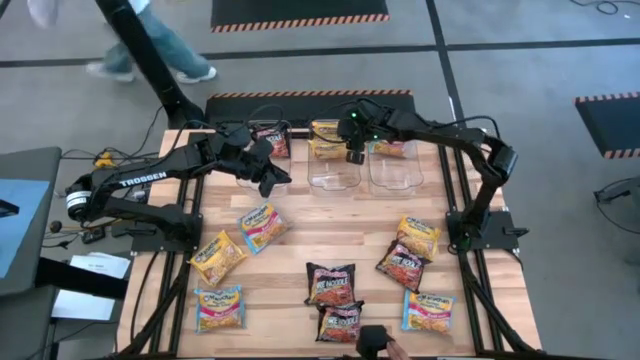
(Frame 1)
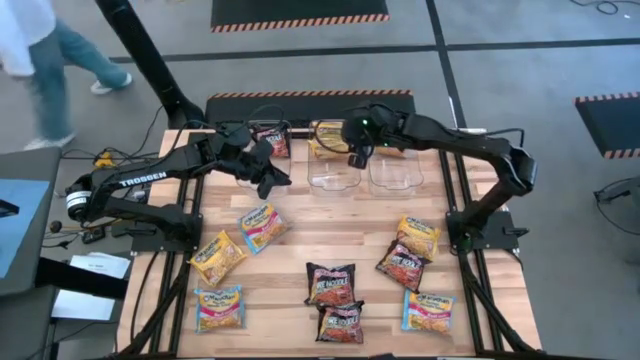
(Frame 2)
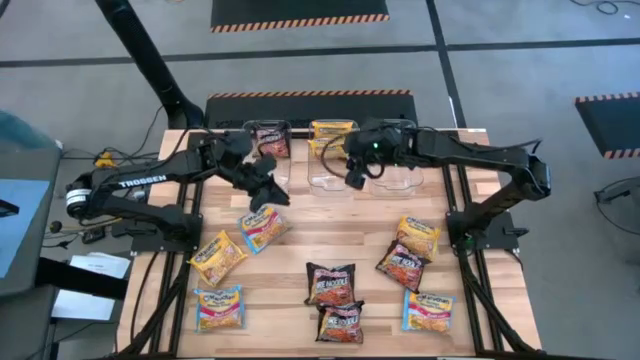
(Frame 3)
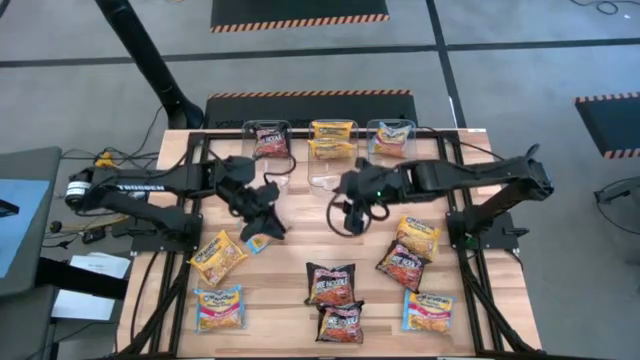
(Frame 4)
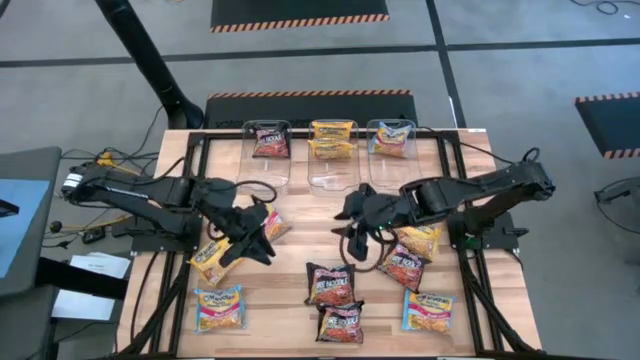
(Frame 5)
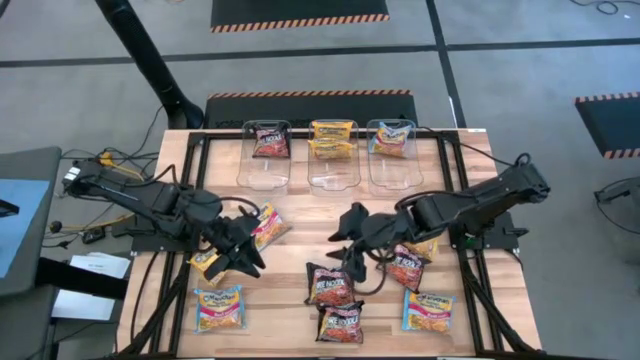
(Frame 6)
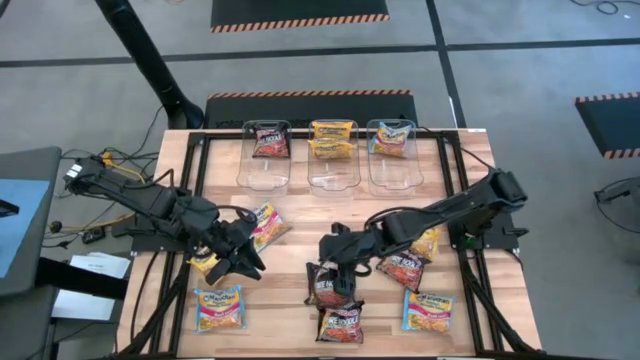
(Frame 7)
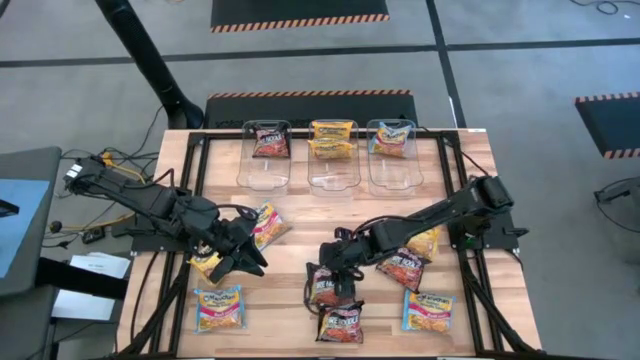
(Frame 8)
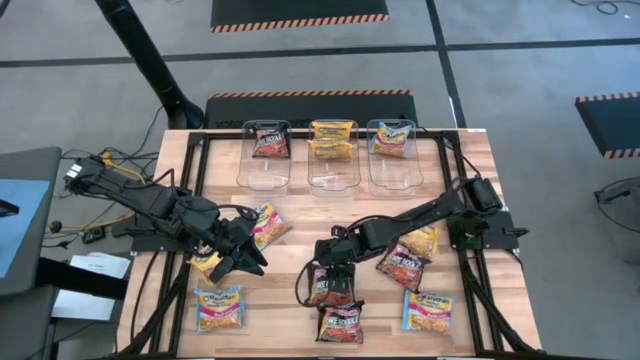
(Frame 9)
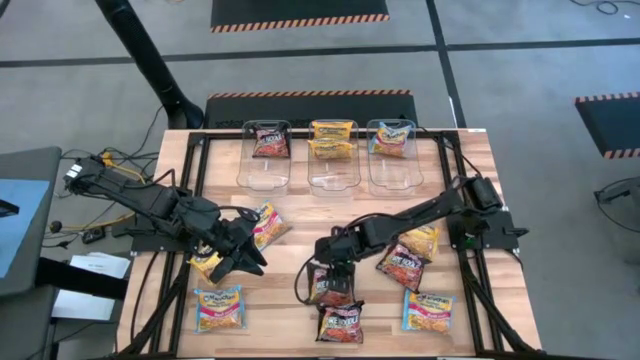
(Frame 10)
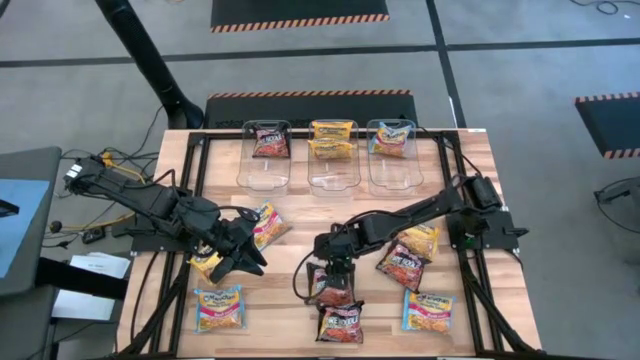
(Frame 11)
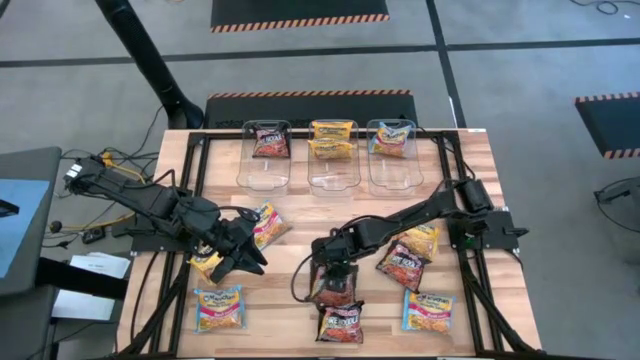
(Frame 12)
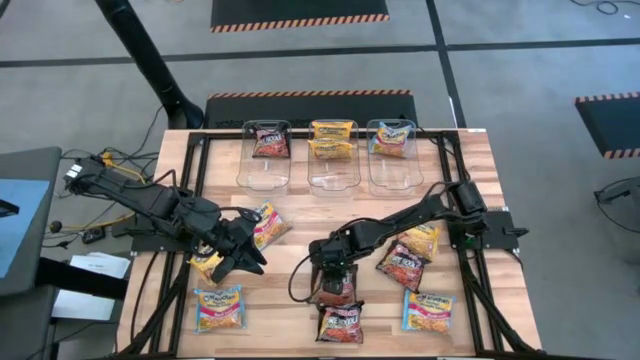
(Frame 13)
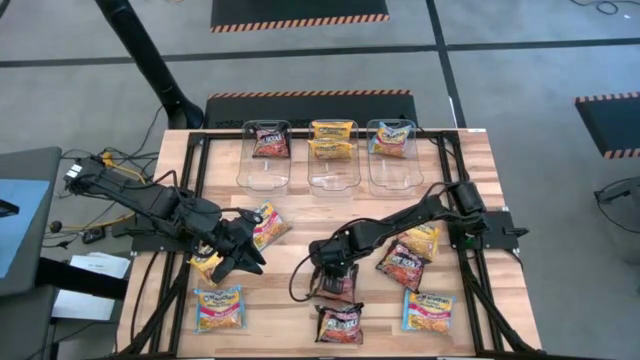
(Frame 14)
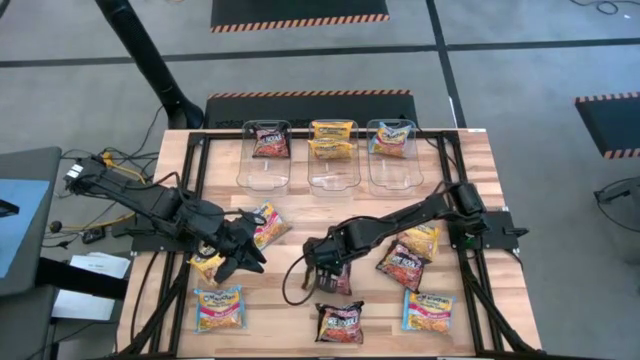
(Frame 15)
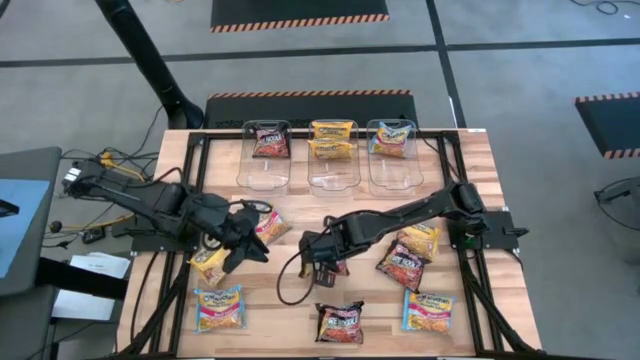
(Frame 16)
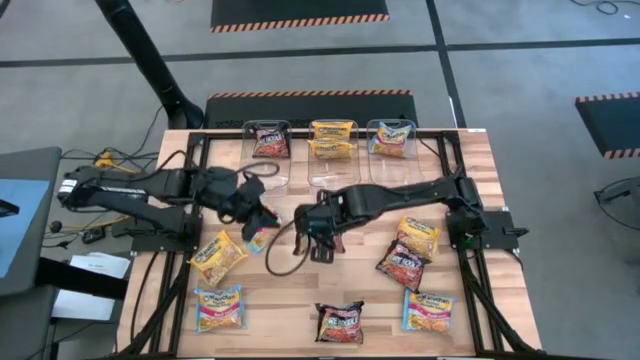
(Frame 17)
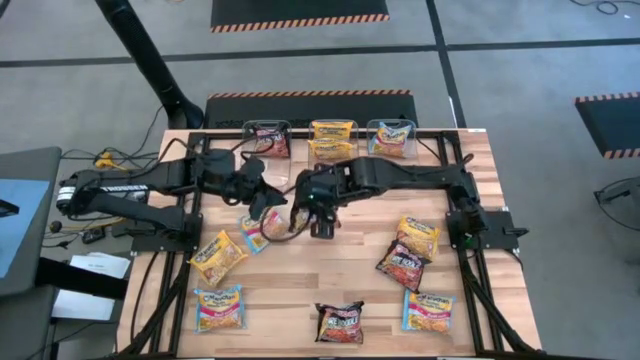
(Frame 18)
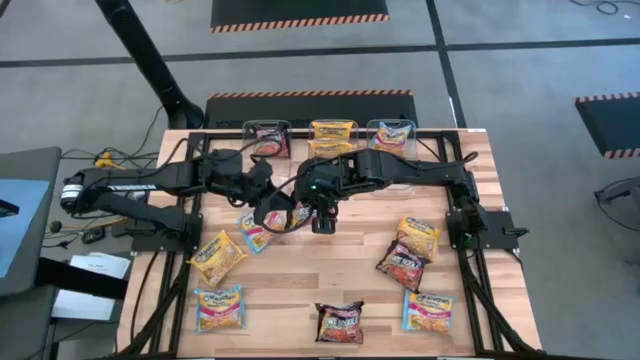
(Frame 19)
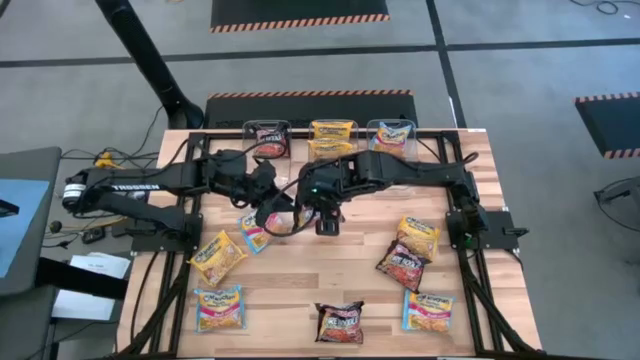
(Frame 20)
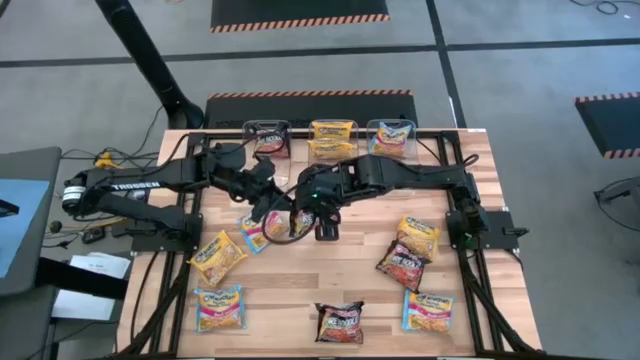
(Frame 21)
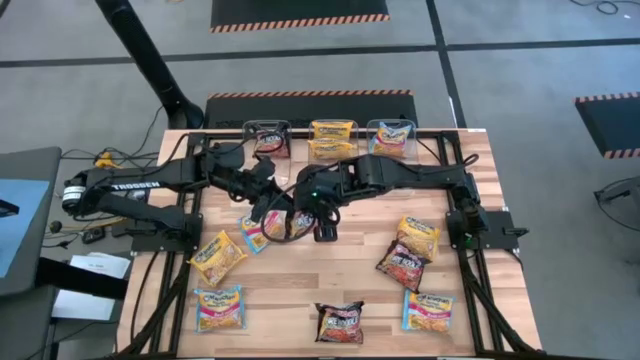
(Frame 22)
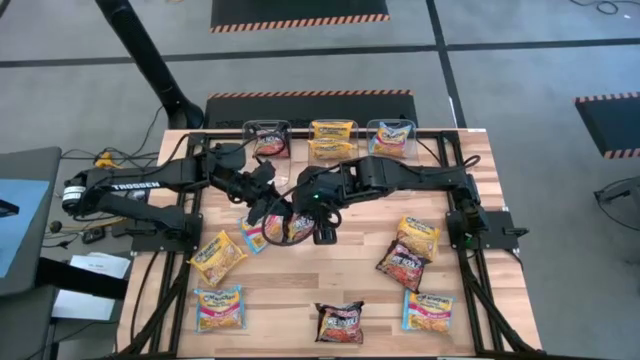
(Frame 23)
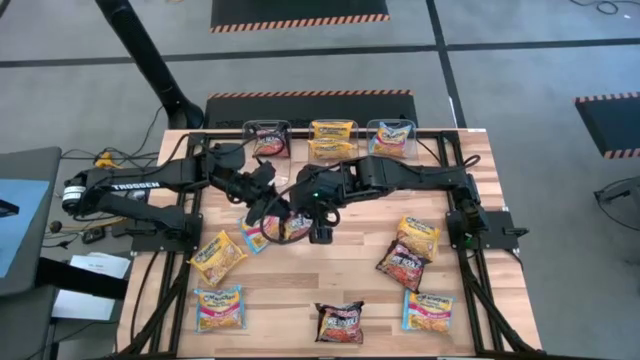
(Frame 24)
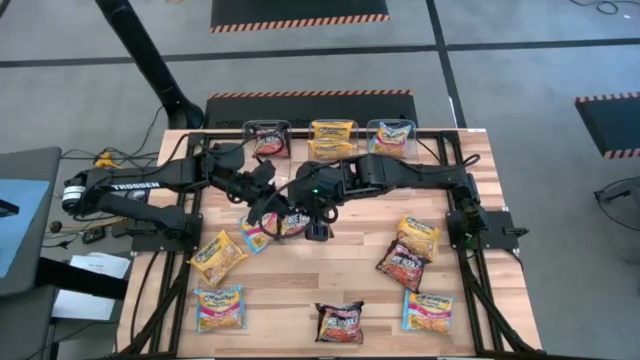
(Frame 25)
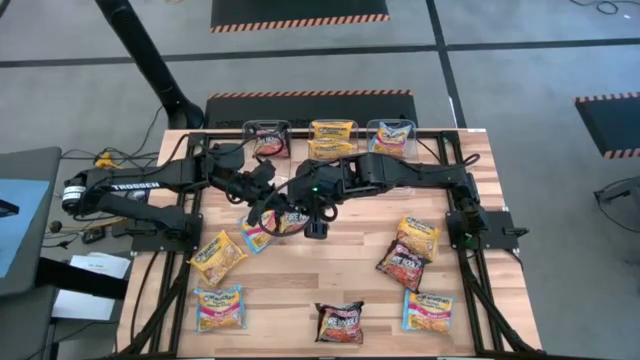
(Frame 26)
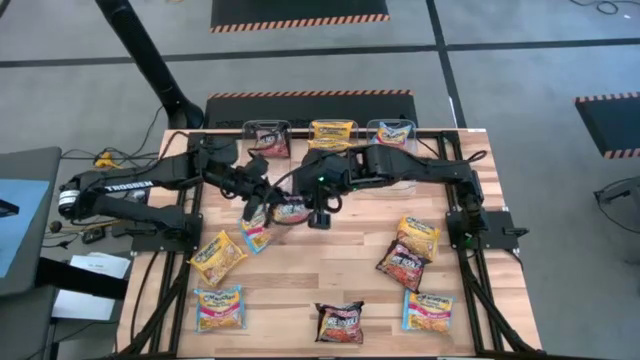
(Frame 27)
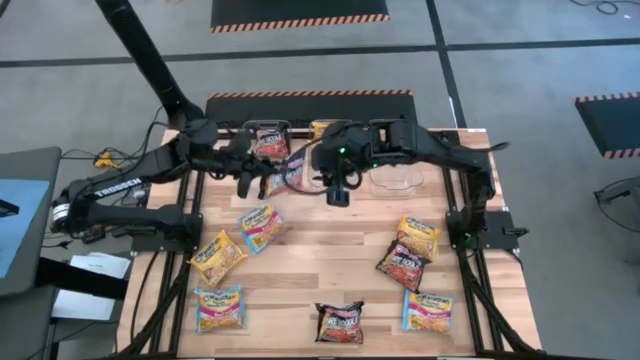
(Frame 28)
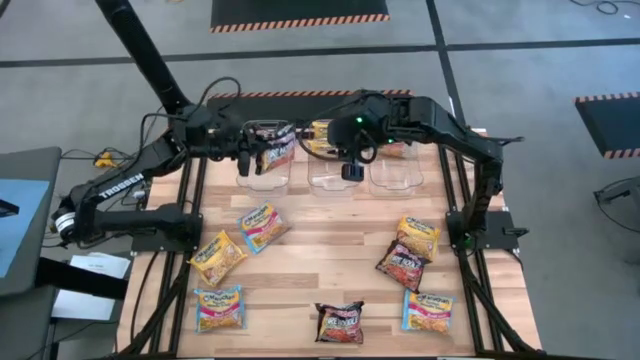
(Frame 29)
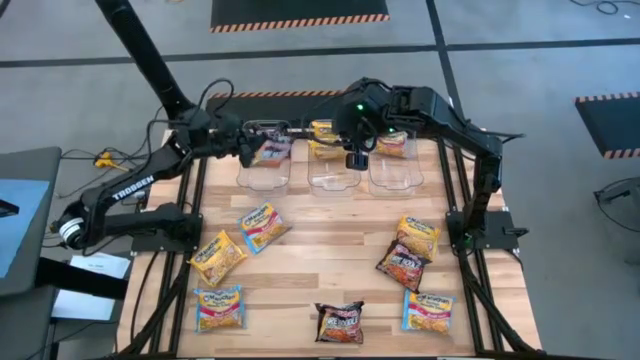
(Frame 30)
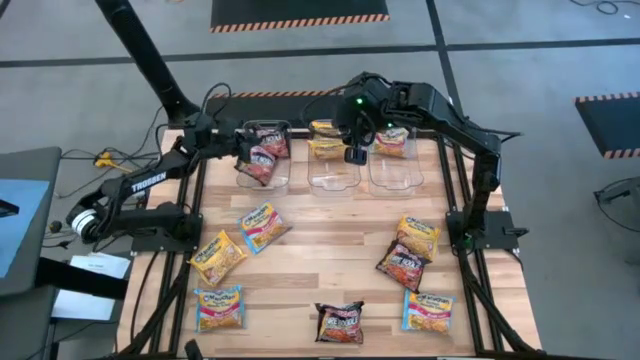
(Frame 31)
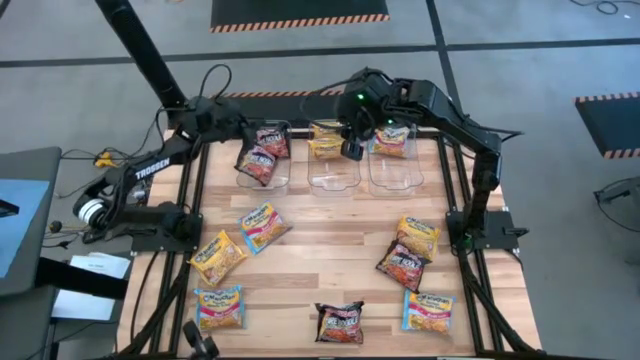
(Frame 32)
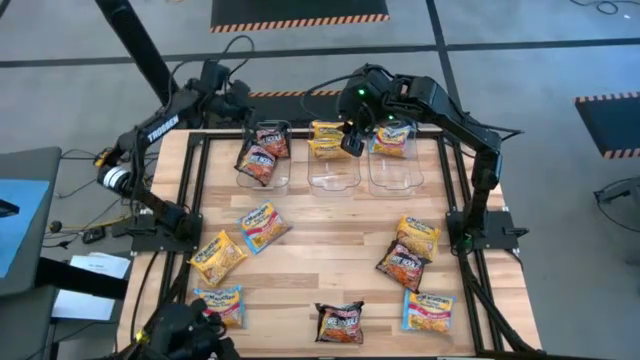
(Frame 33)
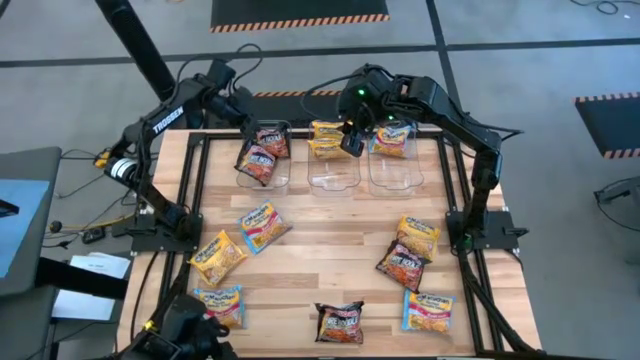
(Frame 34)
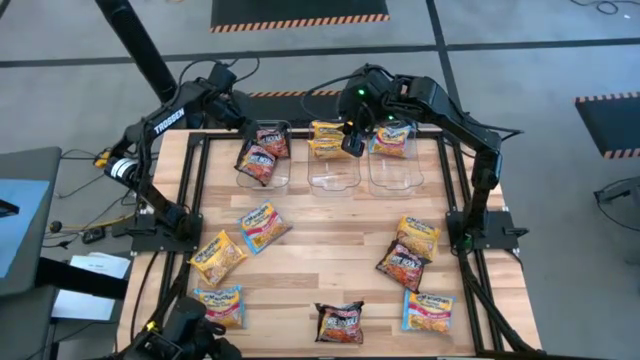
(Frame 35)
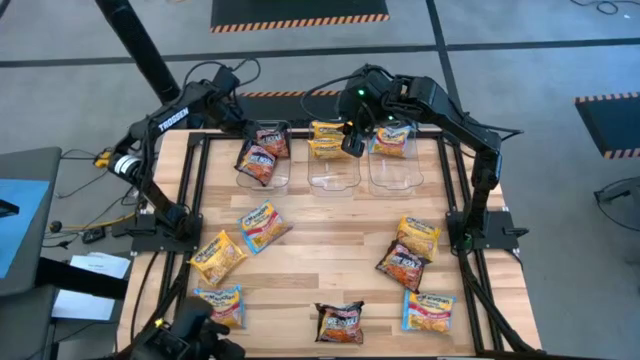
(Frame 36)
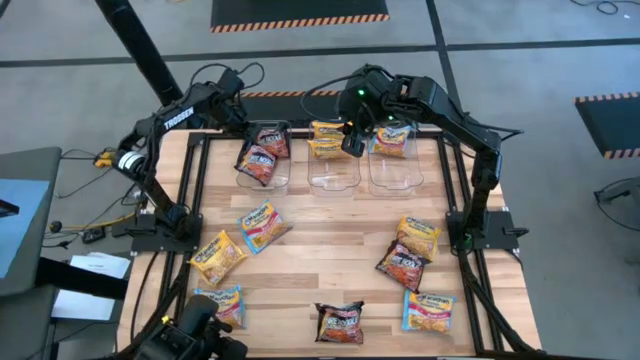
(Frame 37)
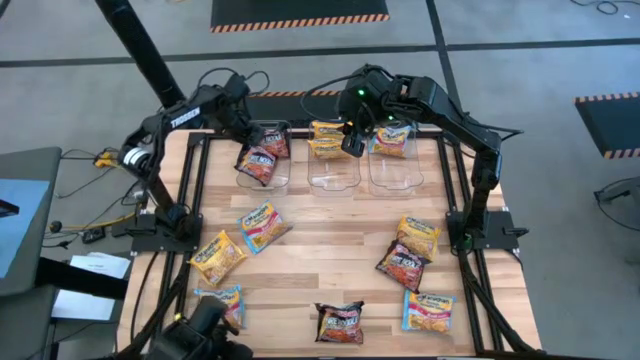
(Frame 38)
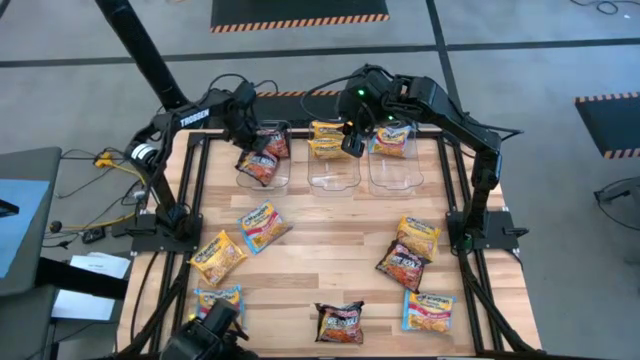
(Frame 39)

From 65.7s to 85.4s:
Task: Sort Maruchan noodles
Put the black noodle pack into the left transparent bin

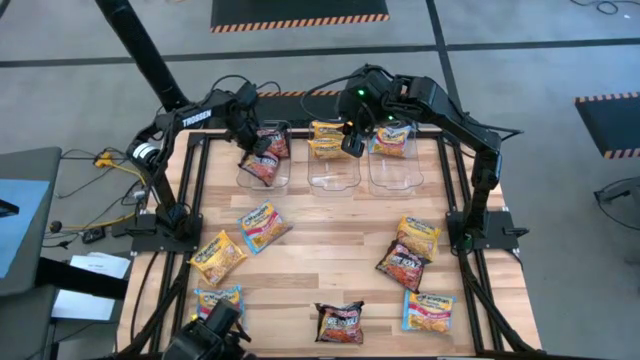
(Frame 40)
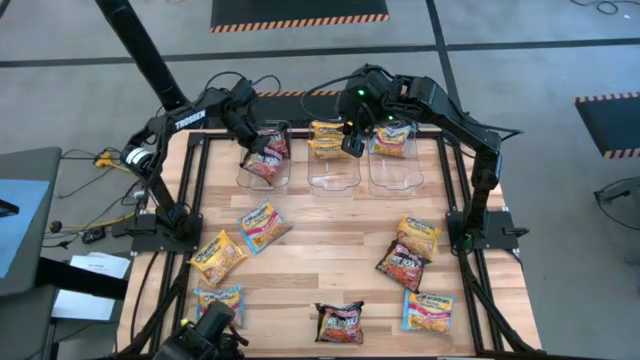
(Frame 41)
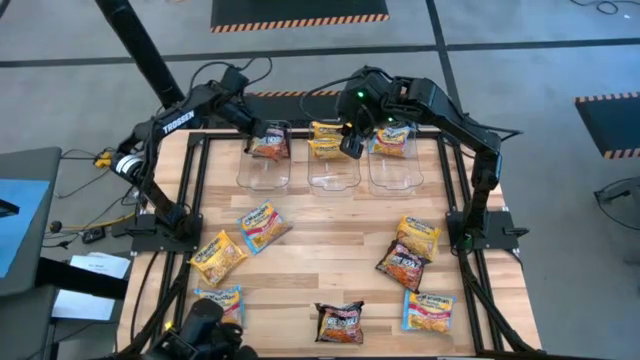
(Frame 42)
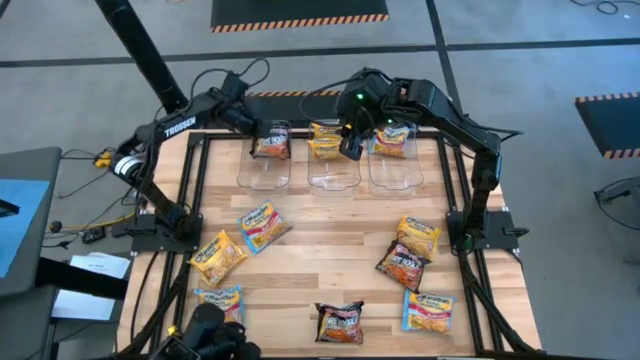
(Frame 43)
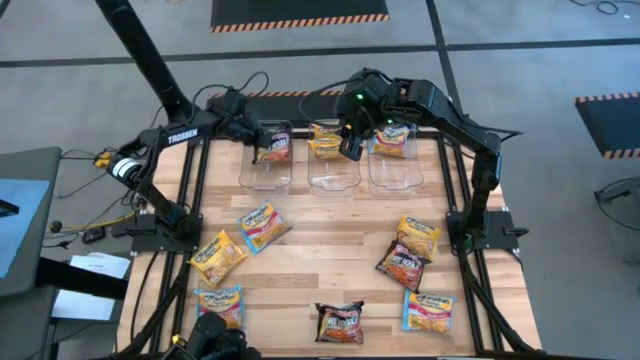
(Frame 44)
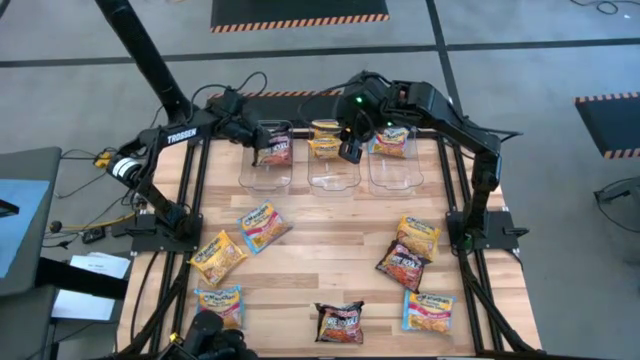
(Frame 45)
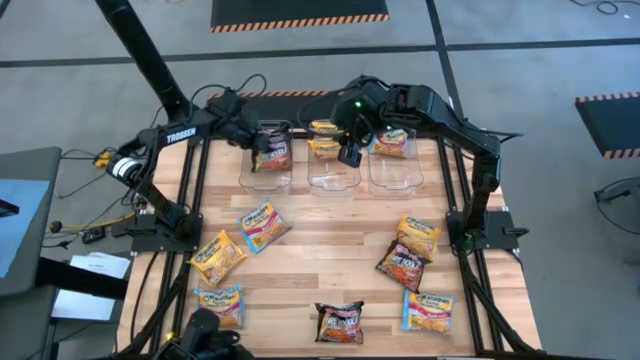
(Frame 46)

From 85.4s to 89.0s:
Put the black noodle pack into the left transparent bin
